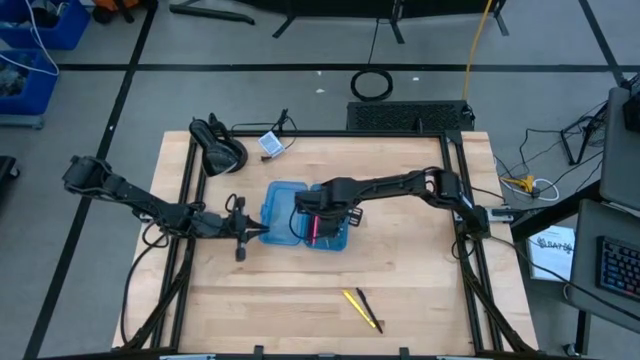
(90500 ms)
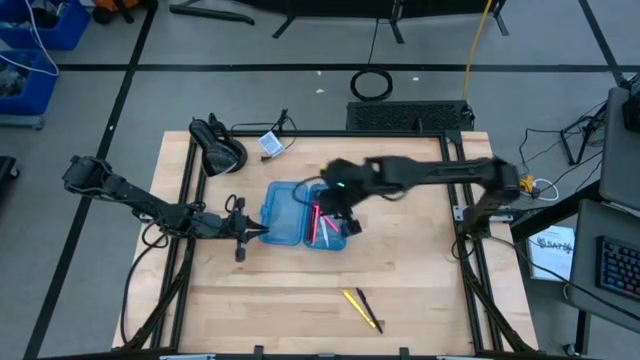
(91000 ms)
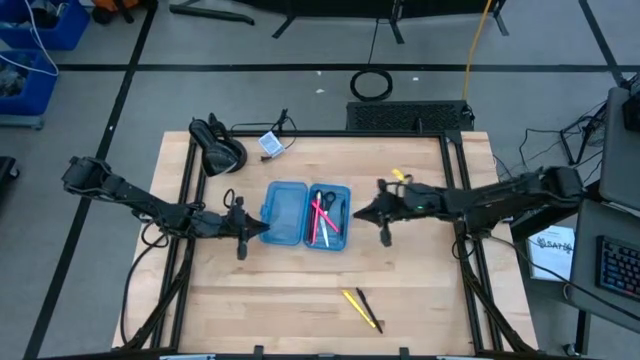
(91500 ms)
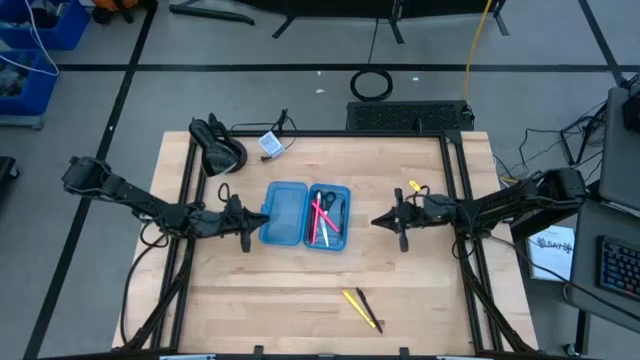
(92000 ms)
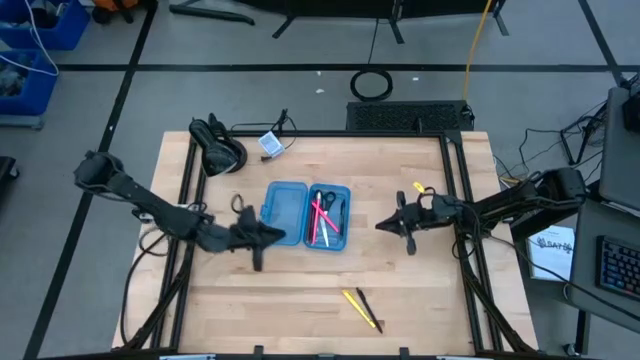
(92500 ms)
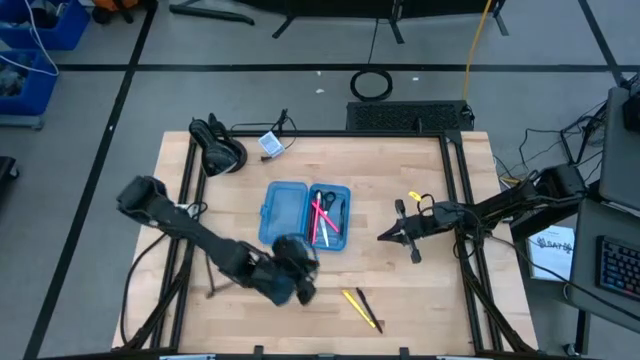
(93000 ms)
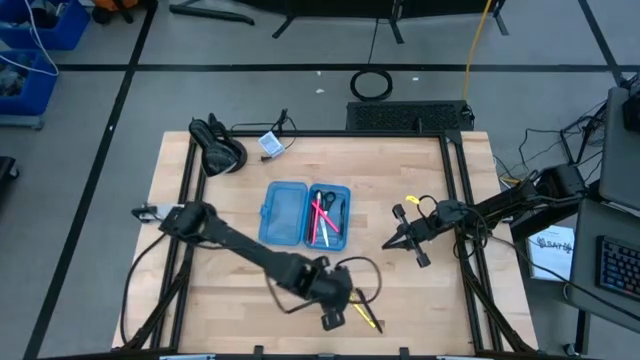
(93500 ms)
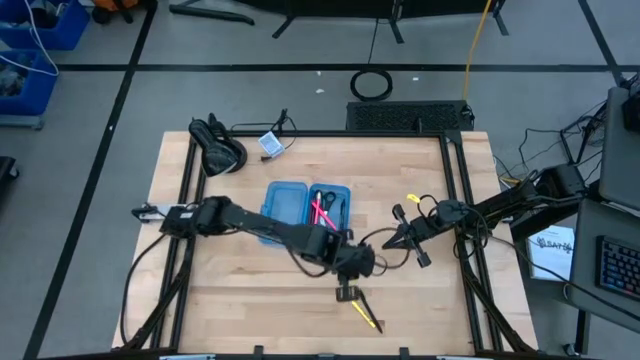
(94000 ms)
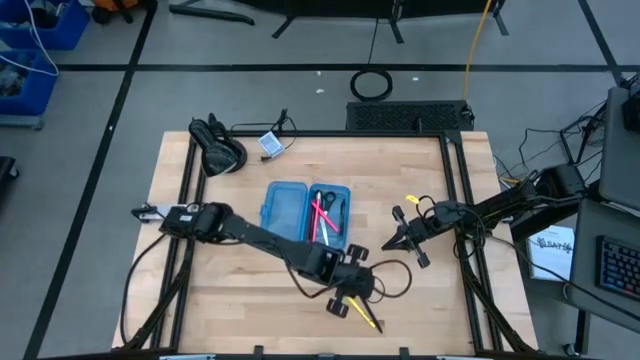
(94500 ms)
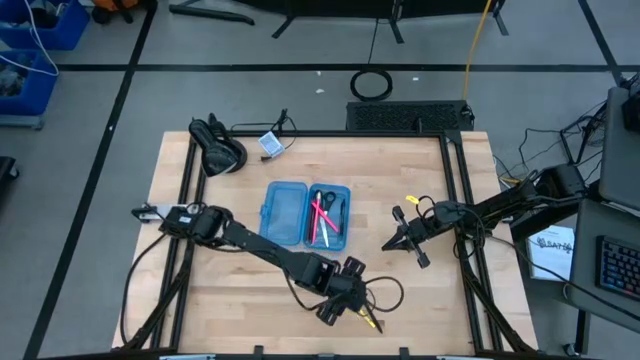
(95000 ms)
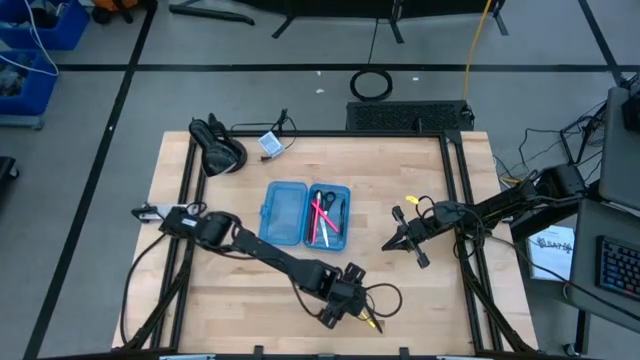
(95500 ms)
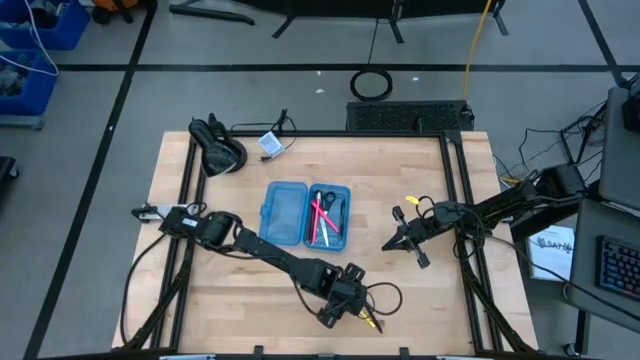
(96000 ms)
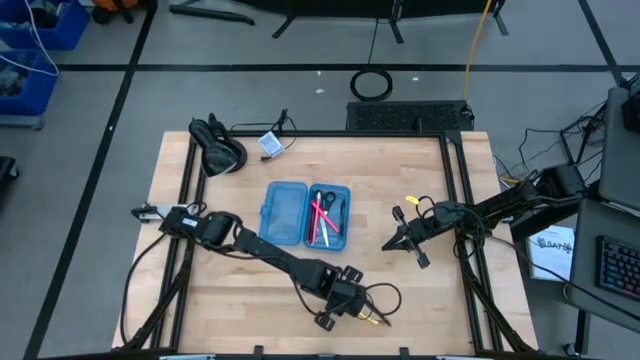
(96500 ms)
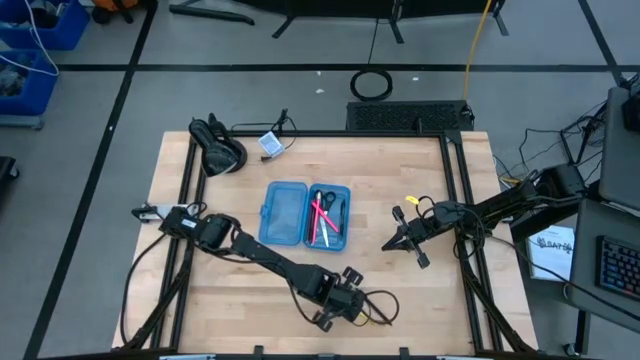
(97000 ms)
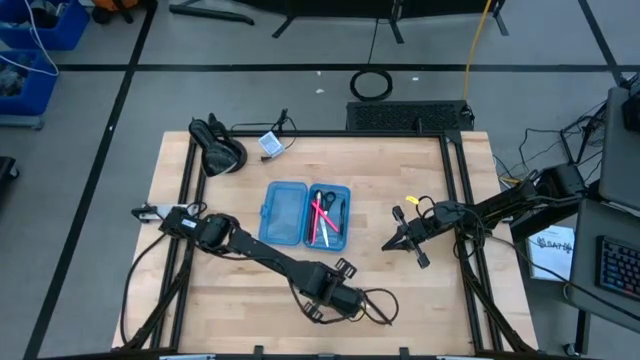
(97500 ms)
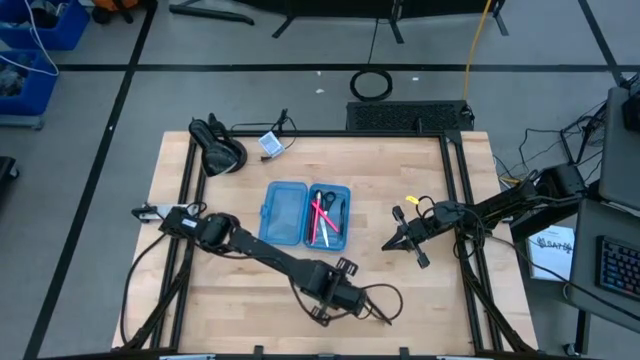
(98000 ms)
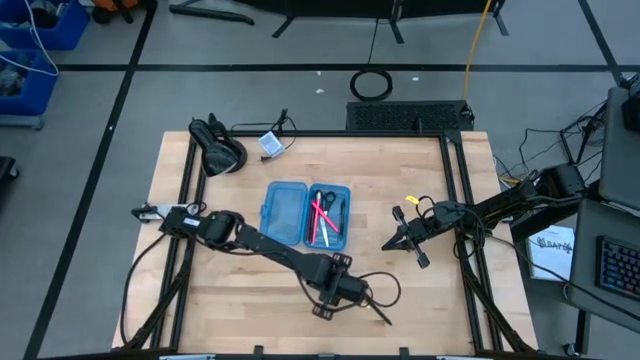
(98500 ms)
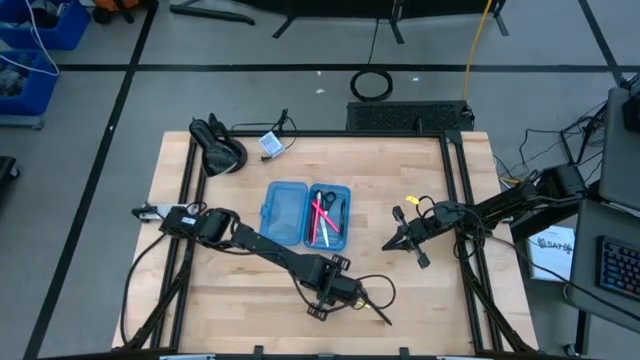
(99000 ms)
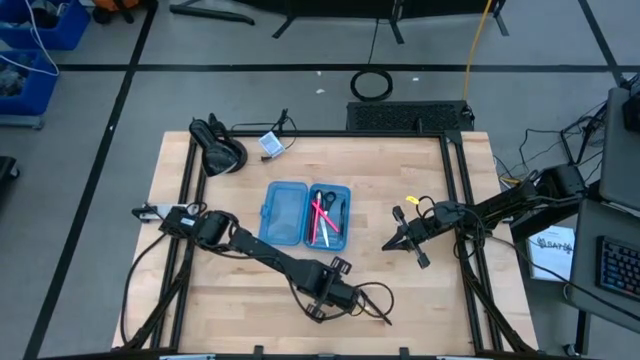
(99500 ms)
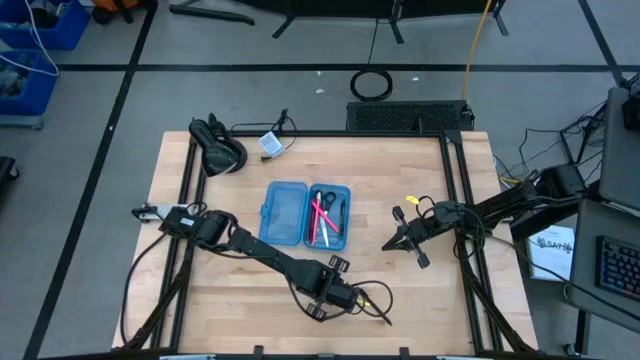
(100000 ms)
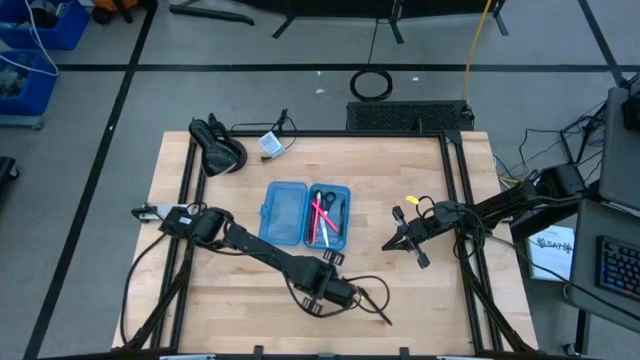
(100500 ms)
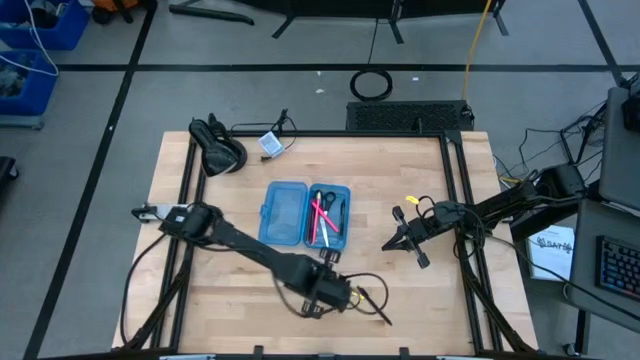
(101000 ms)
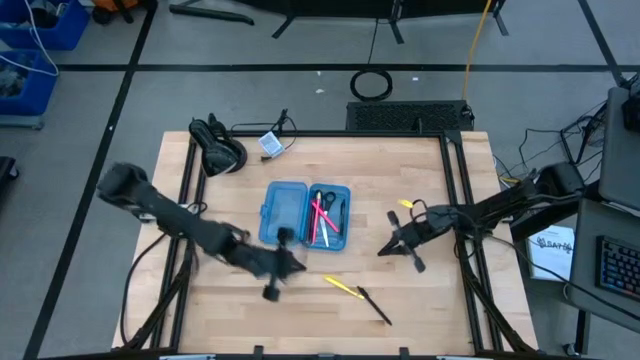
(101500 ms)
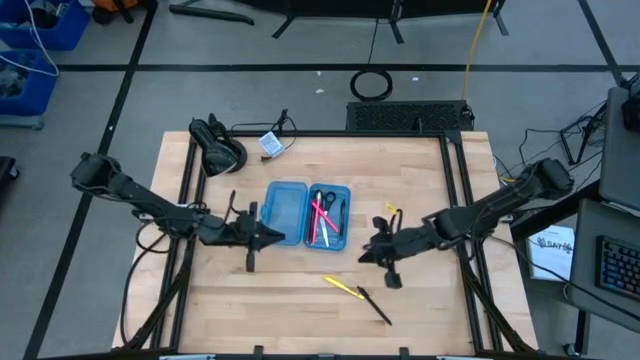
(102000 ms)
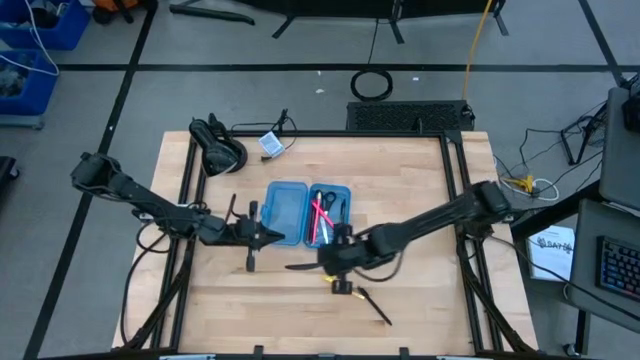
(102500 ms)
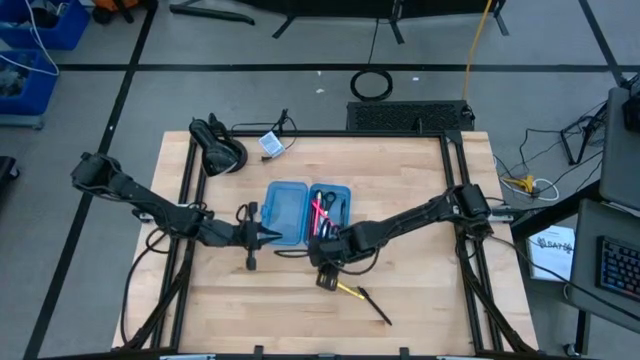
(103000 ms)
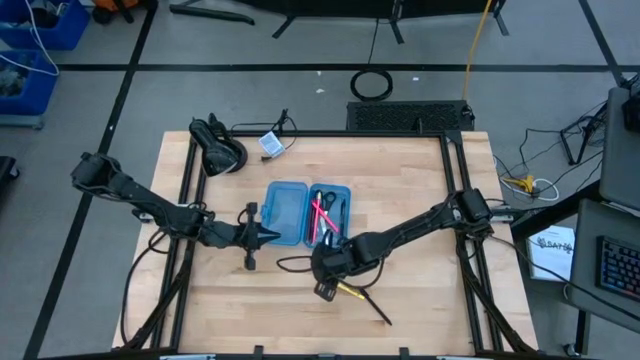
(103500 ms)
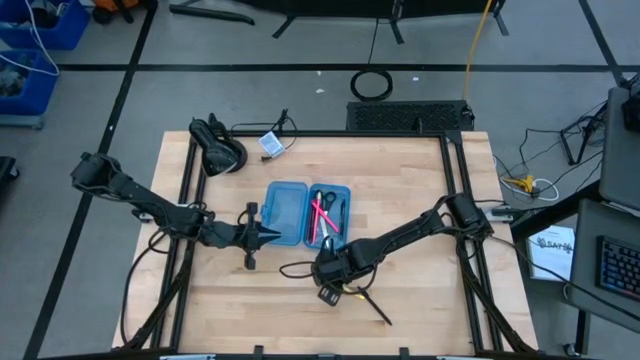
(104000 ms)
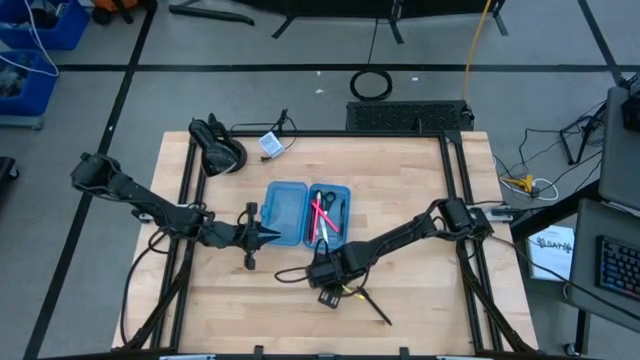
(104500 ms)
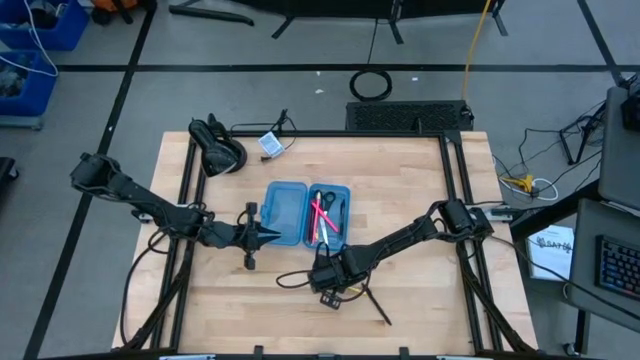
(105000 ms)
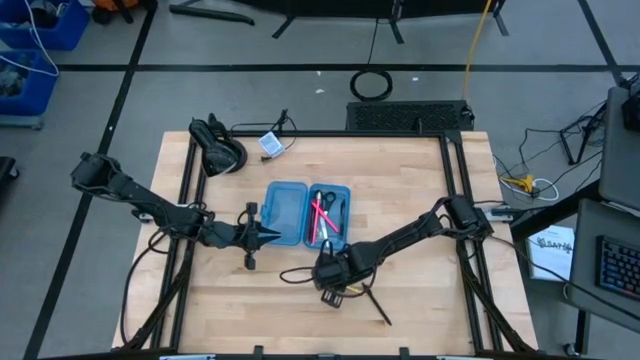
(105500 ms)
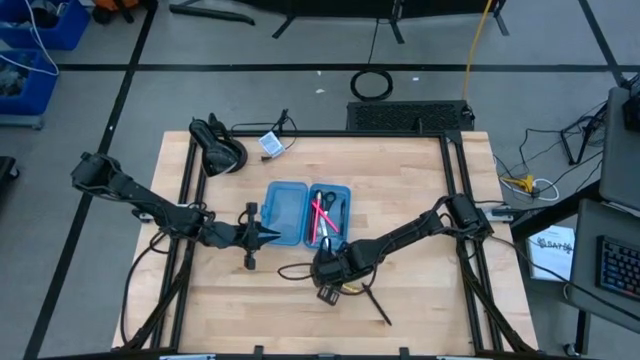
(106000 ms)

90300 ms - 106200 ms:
Task: Pick & place school supplies into a supply box
Put the yellow pen into the blue supply box

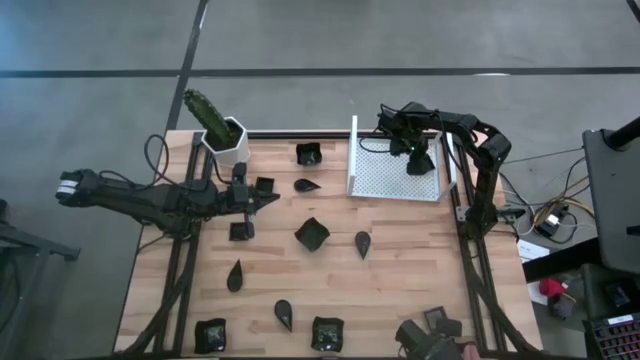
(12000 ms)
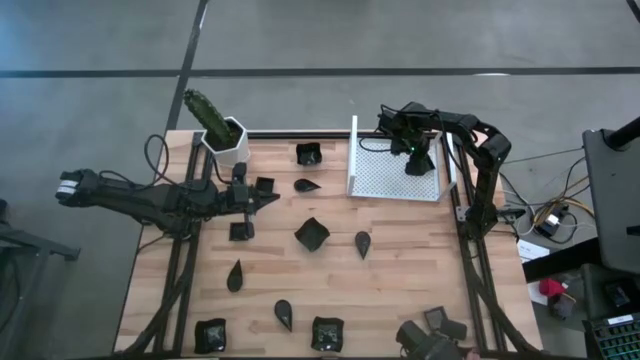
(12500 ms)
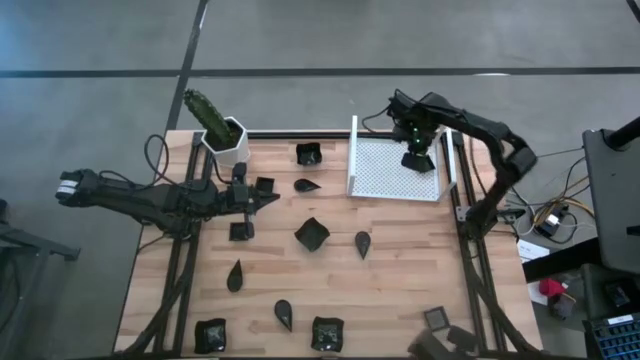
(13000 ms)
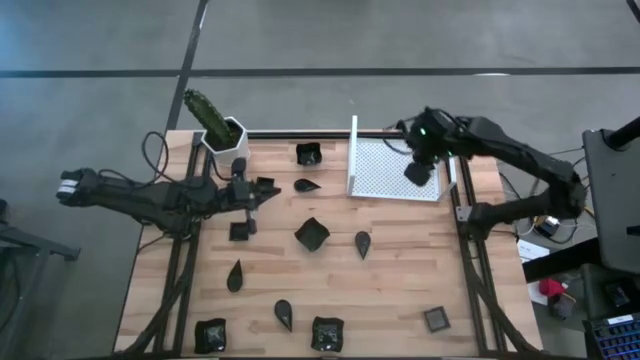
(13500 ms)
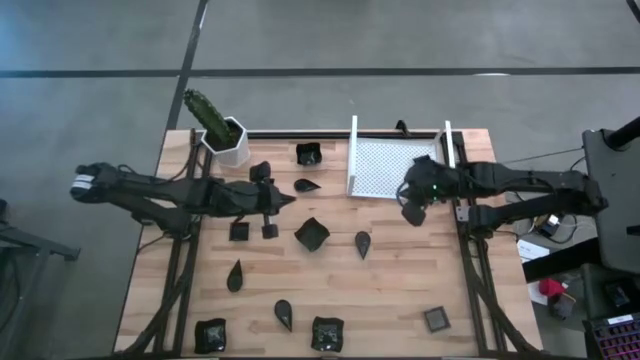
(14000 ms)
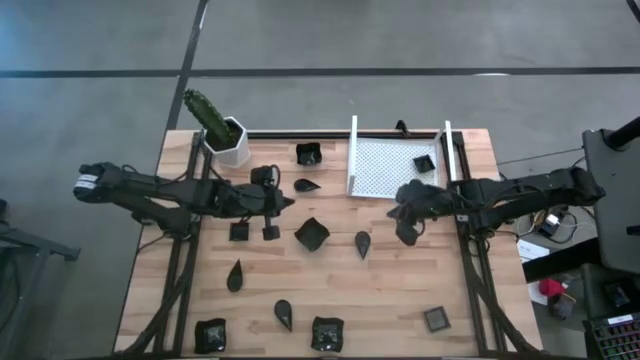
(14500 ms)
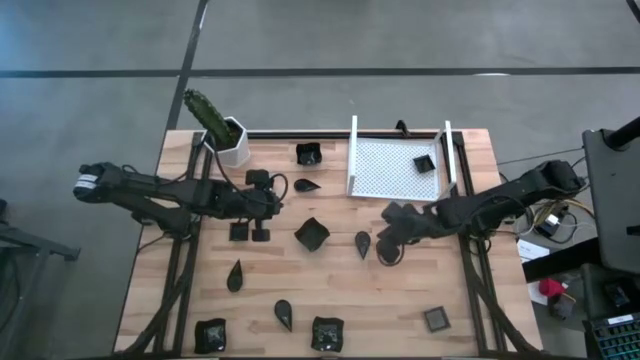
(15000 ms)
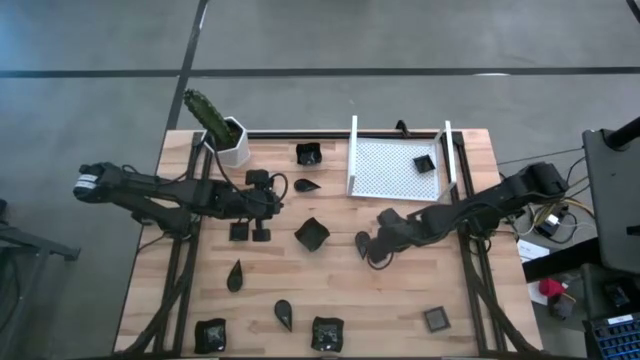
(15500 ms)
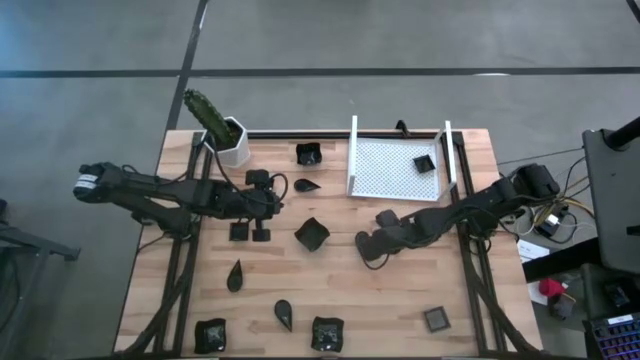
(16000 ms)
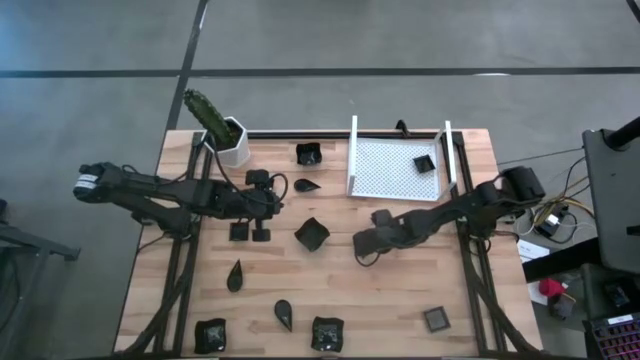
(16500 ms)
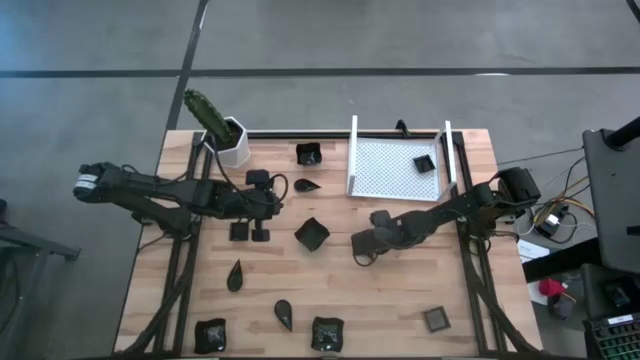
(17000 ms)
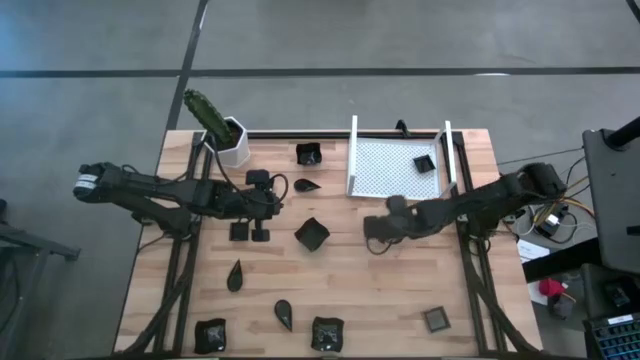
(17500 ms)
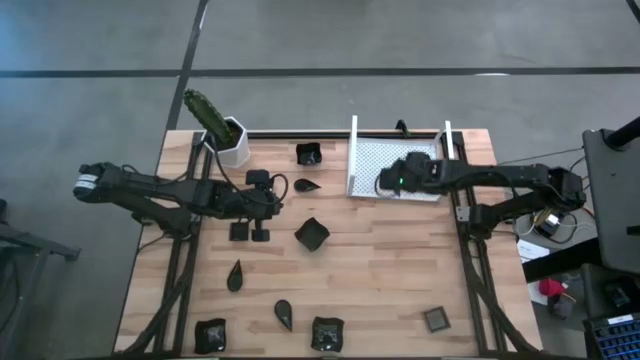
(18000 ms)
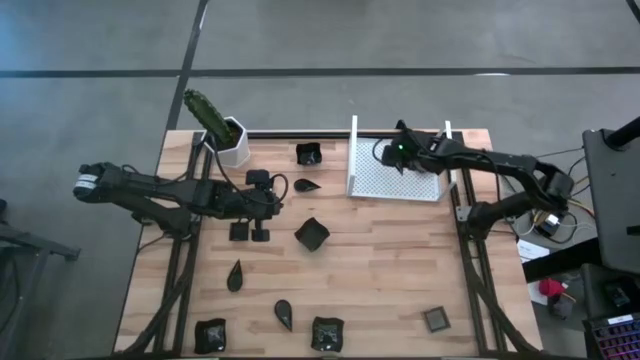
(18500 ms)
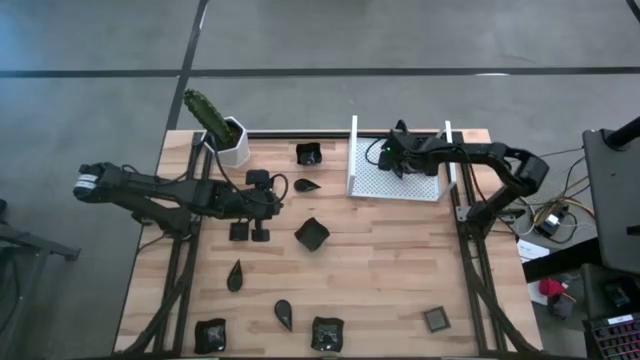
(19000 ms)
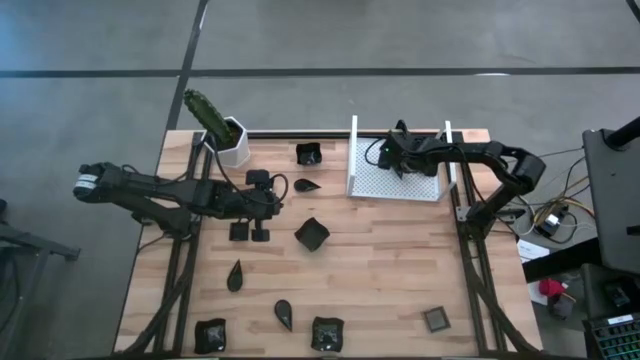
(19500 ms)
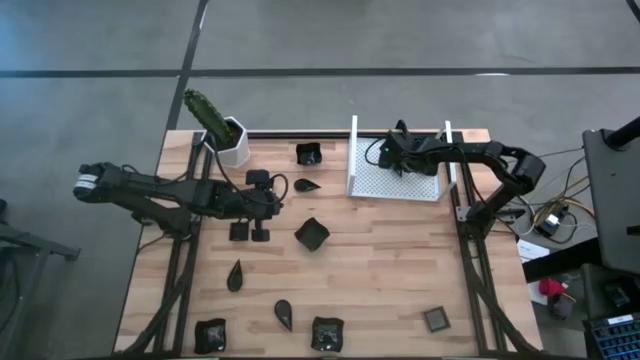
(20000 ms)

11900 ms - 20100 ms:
Task: Pick & Place Mini shaped plates
Put the black drop shaped plate on the shelf
